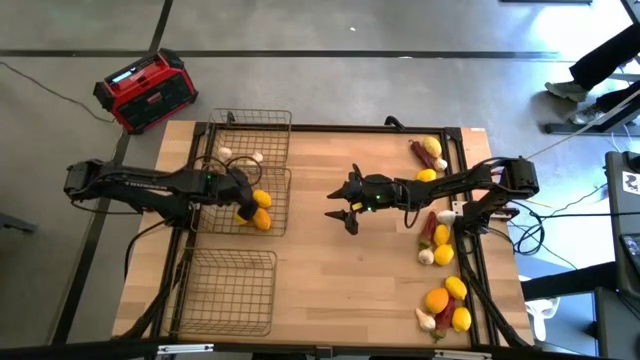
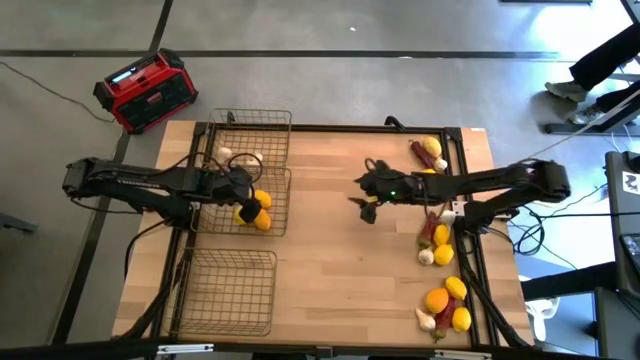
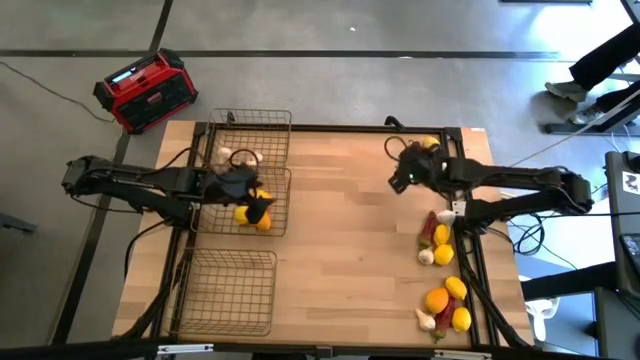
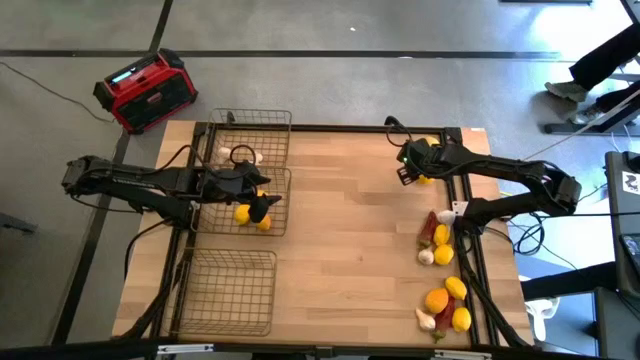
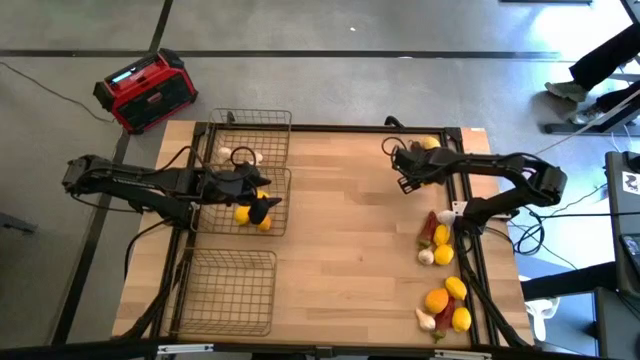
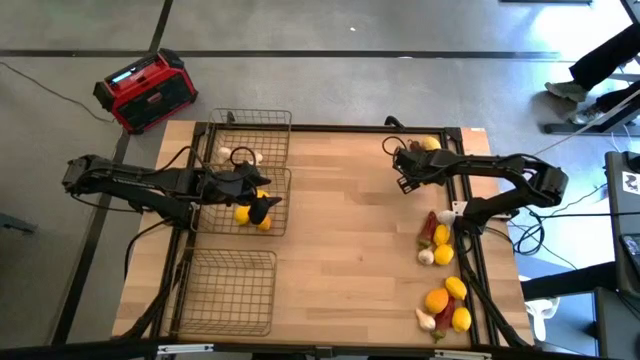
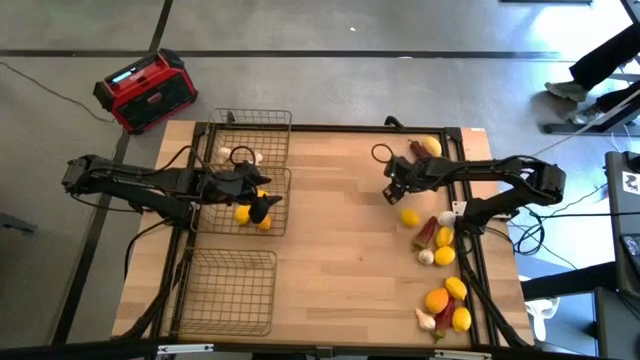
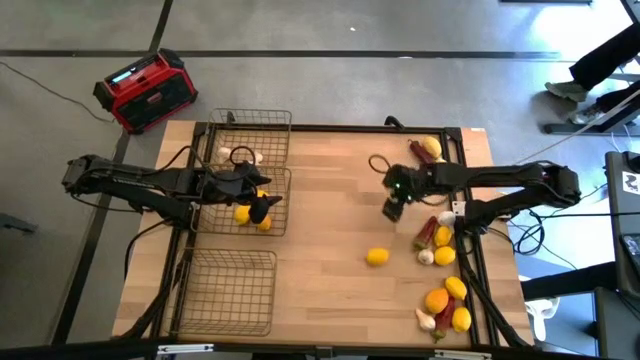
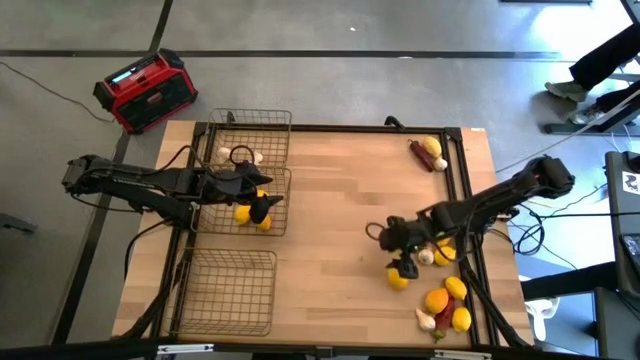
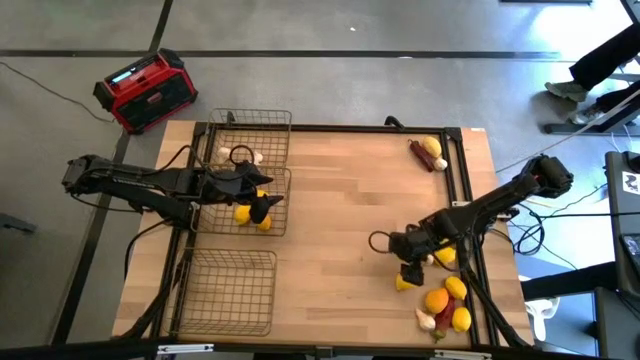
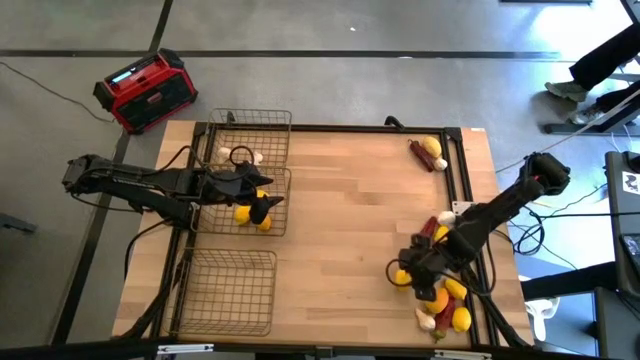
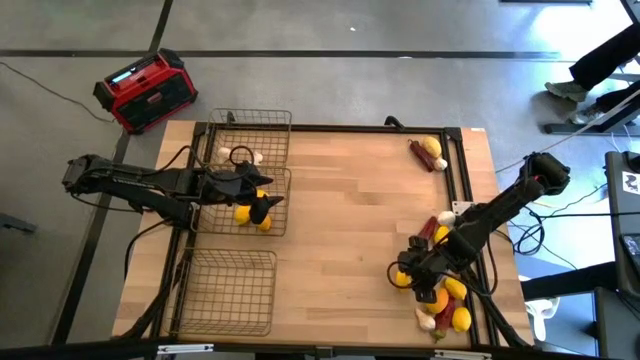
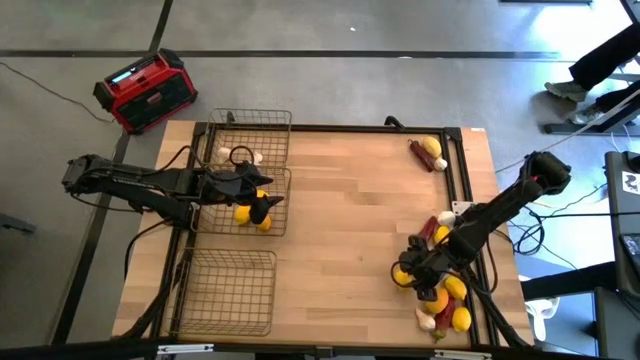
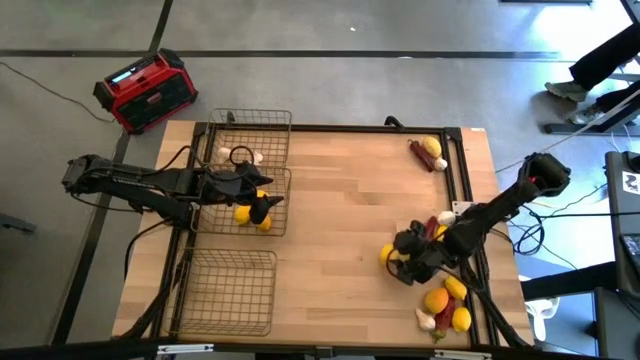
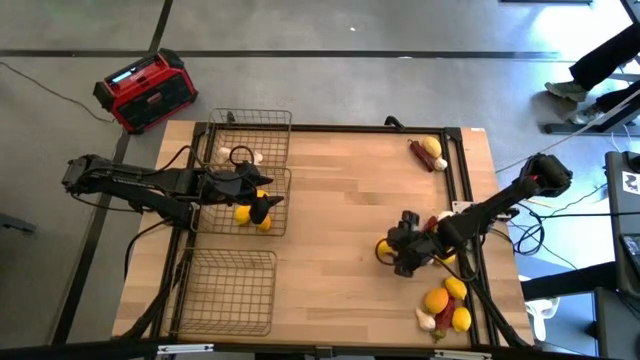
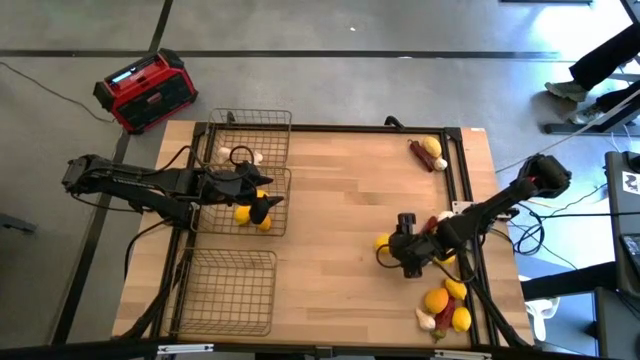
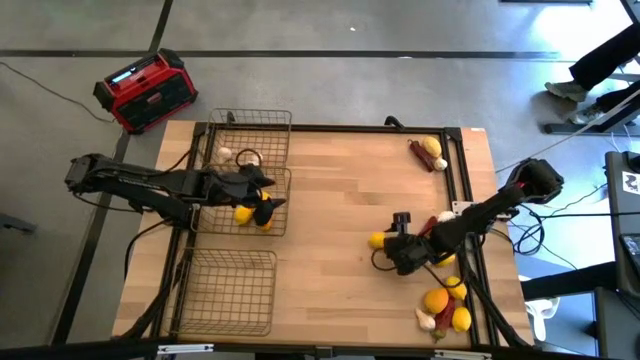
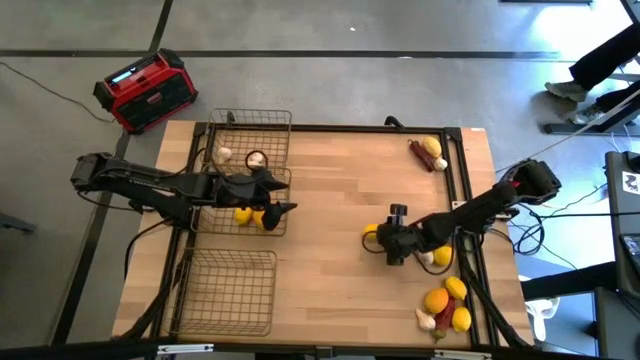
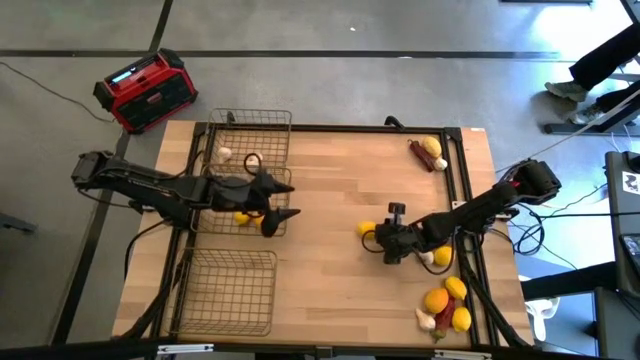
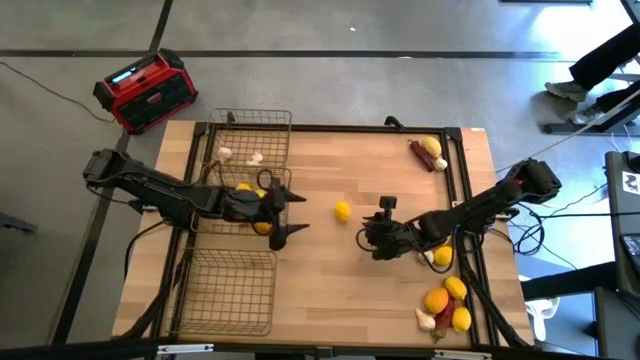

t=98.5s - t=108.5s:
Task: Sort produce into baskets
Put the lemon in the middle wire basket

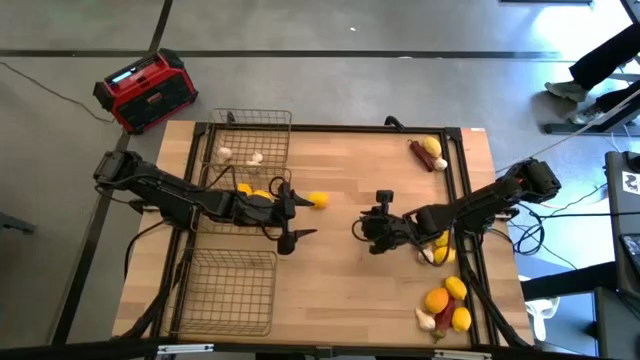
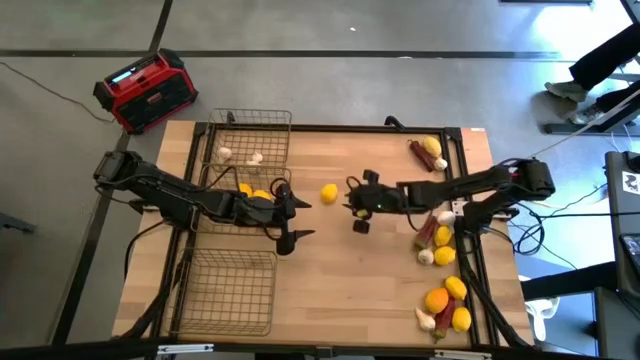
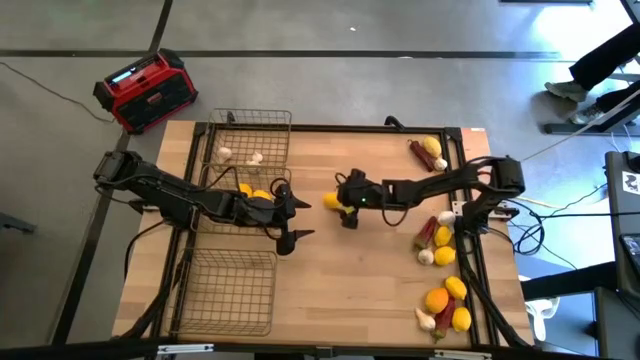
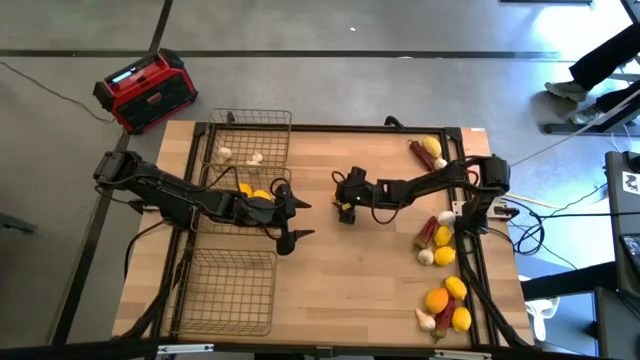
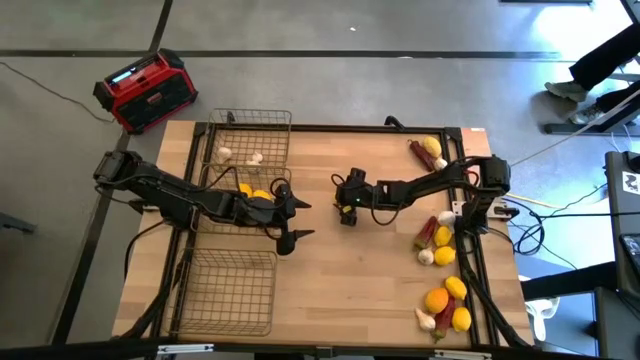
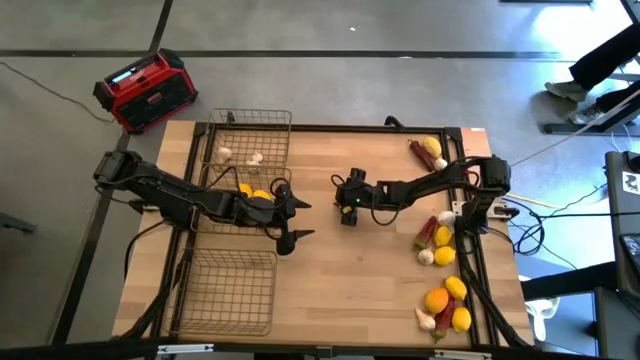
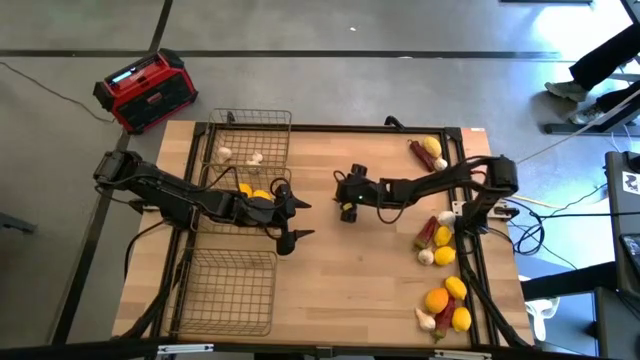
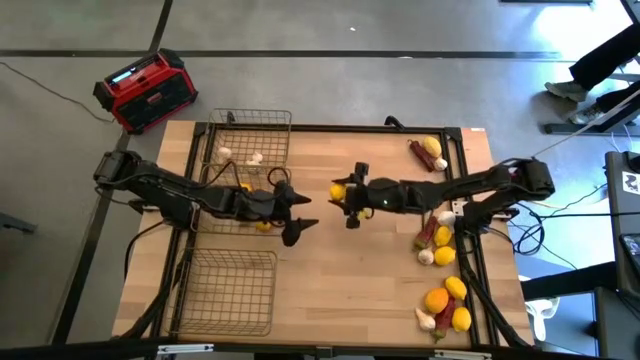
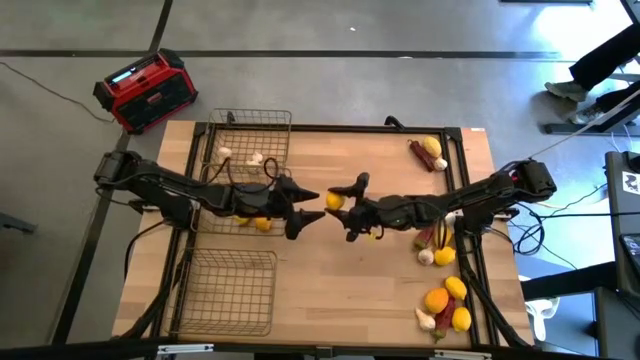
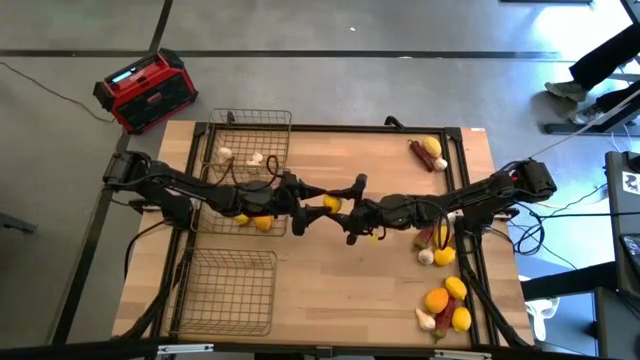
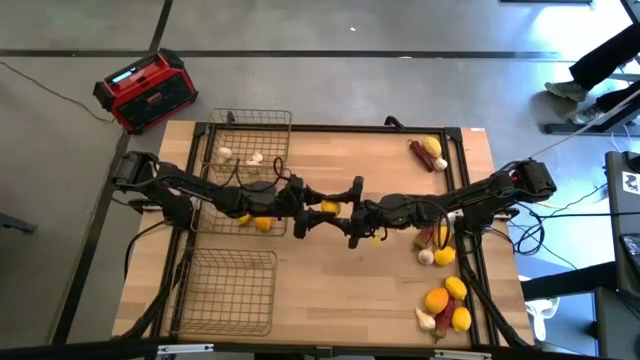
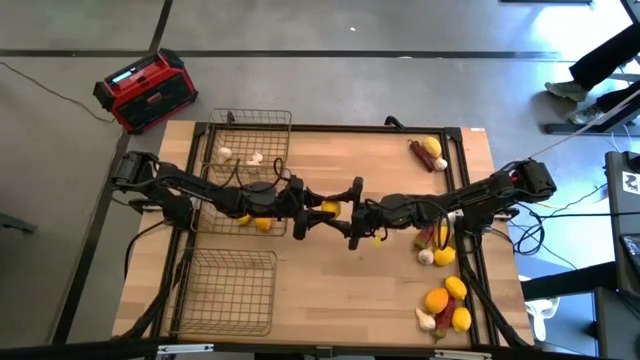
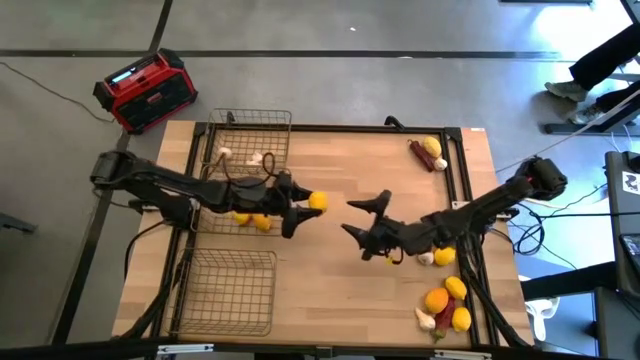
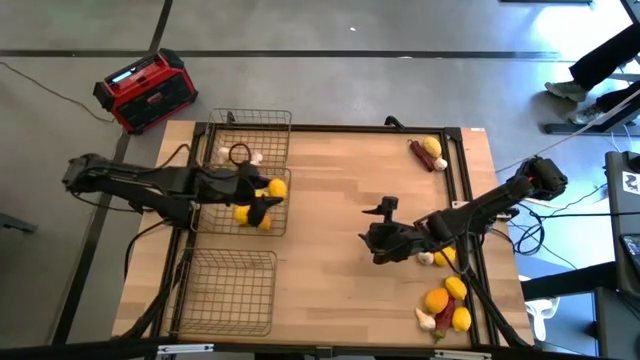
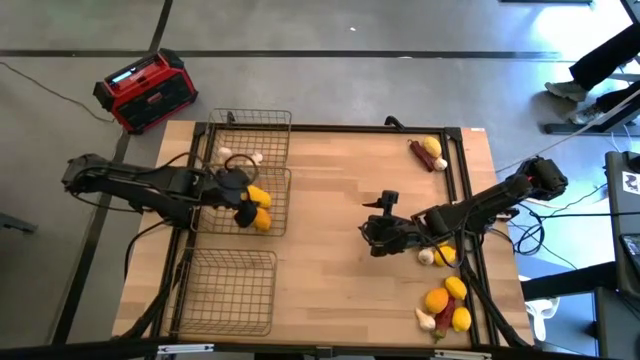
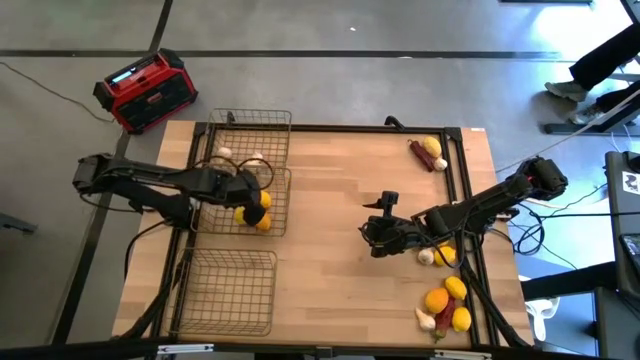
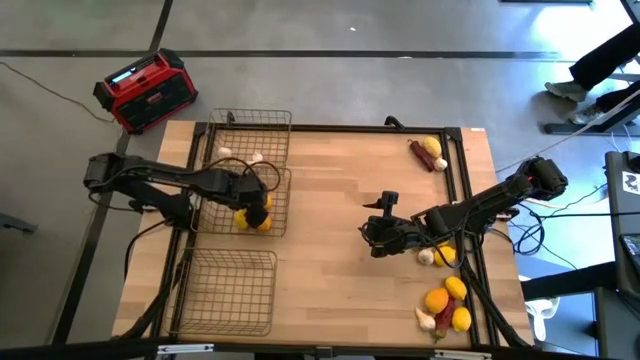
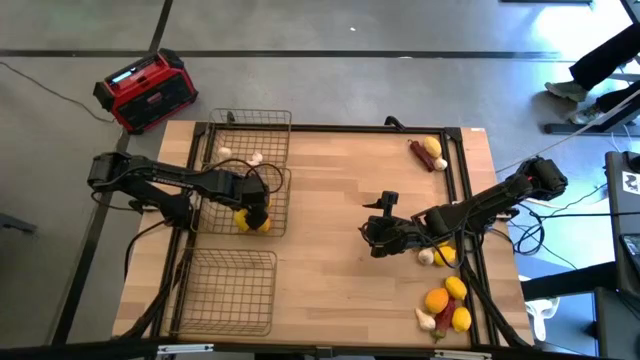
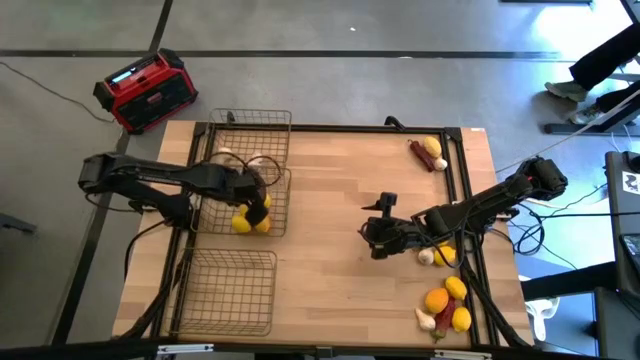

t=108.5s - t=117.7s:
Put the lemon in the middle wire basket
